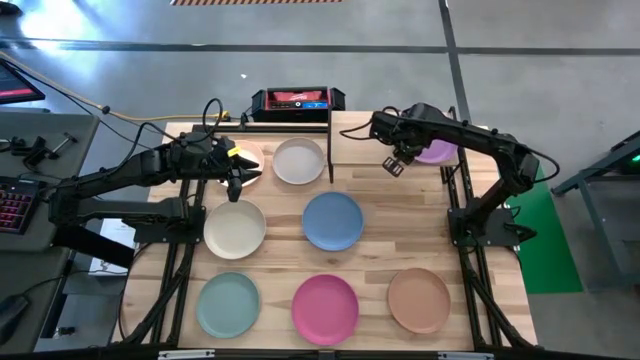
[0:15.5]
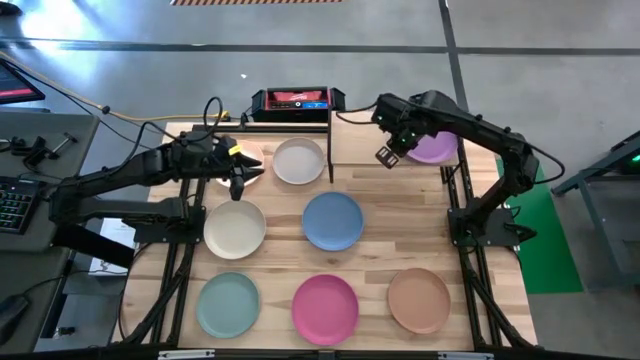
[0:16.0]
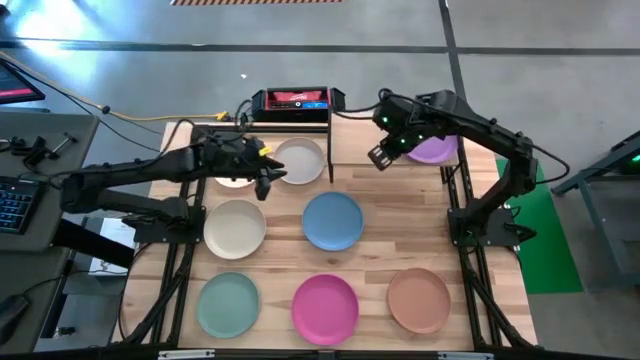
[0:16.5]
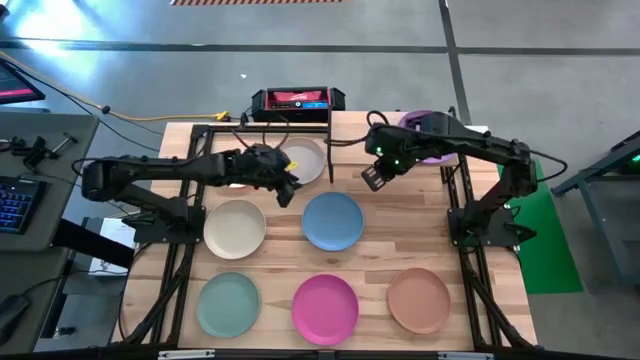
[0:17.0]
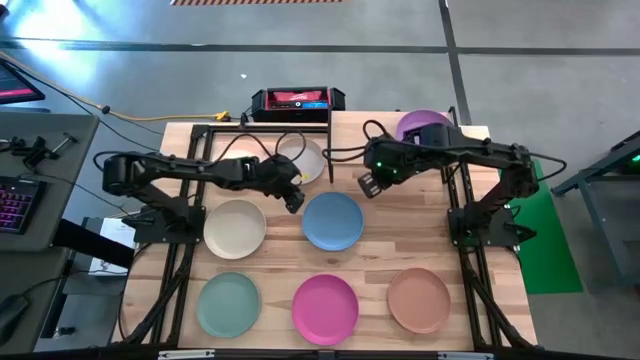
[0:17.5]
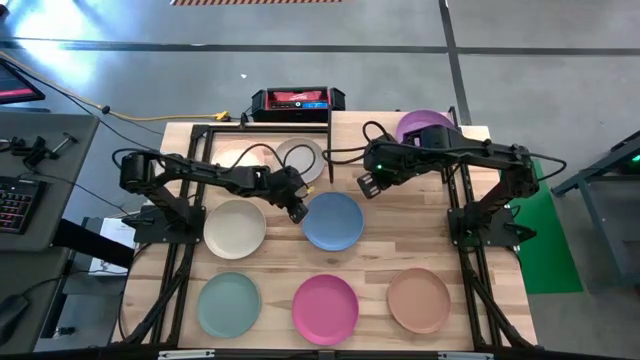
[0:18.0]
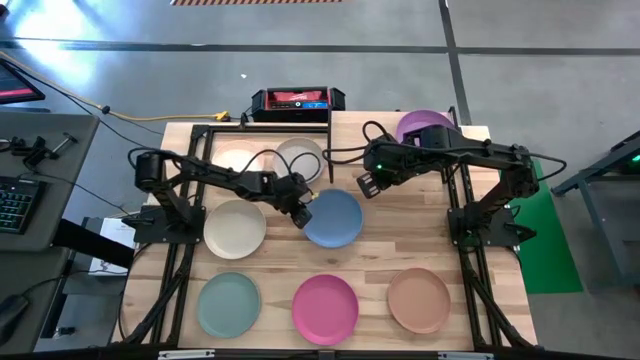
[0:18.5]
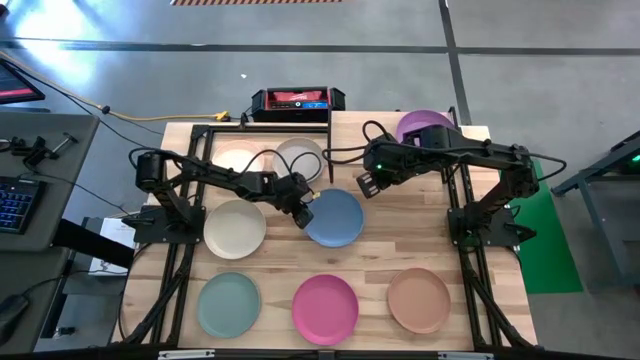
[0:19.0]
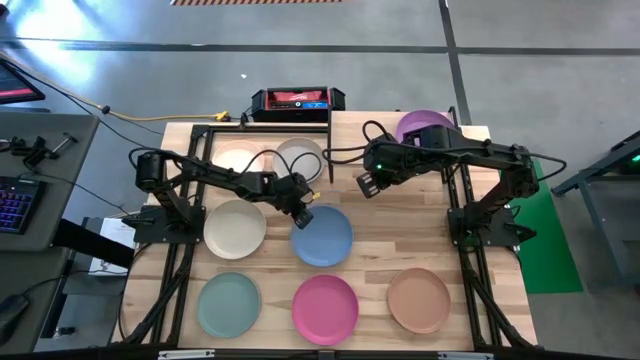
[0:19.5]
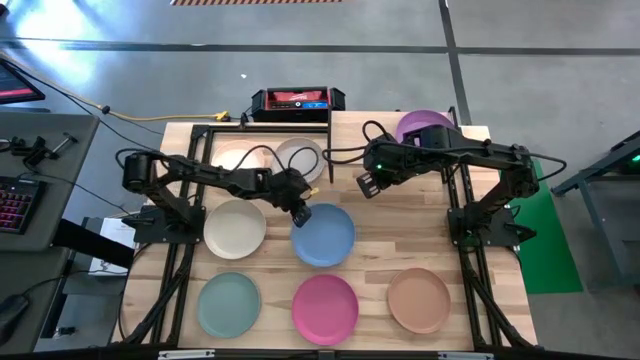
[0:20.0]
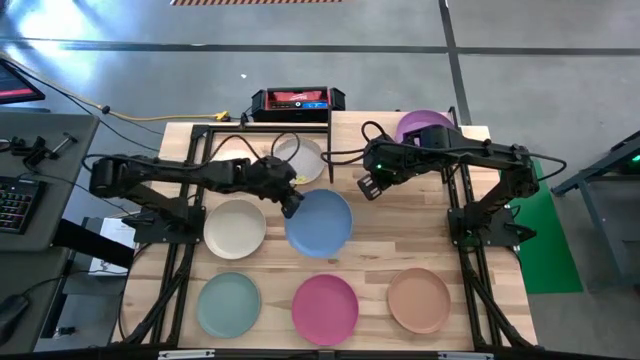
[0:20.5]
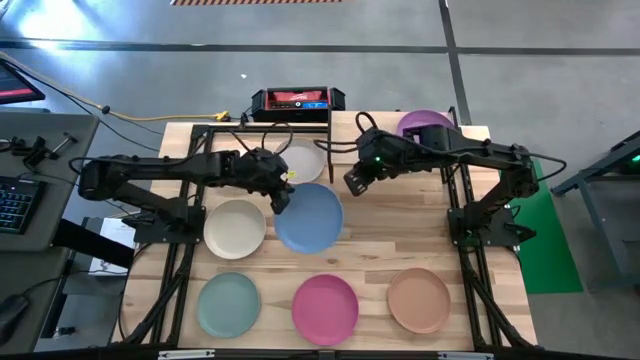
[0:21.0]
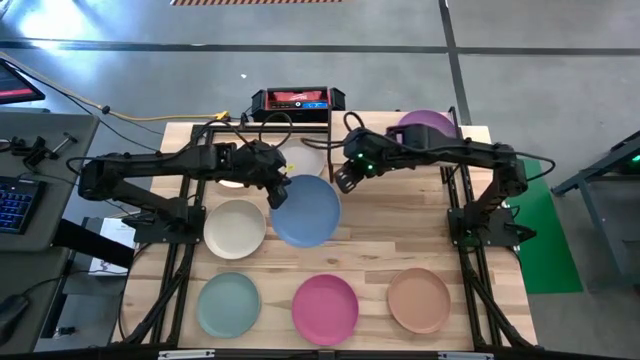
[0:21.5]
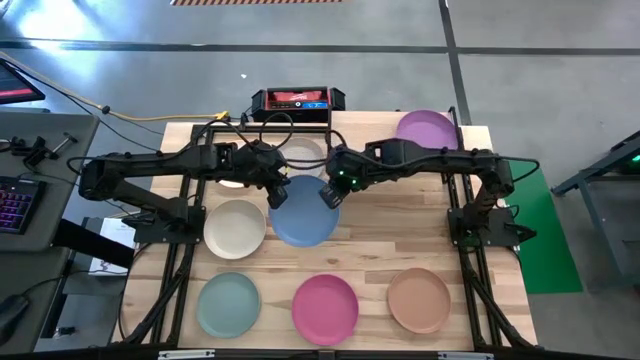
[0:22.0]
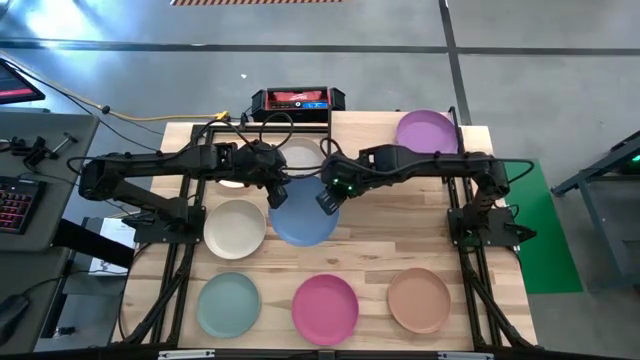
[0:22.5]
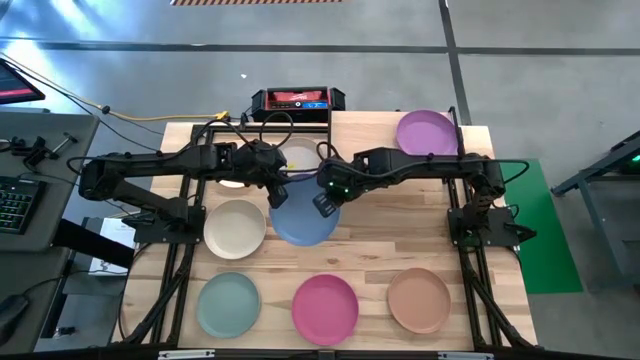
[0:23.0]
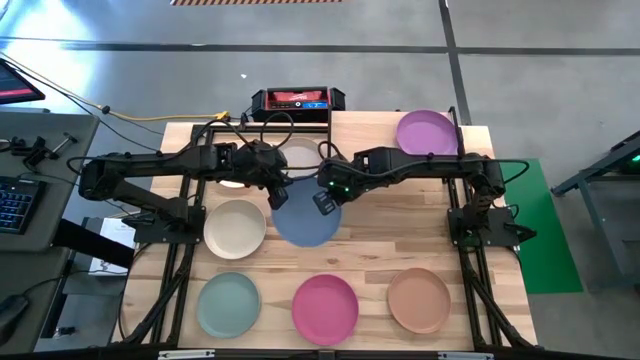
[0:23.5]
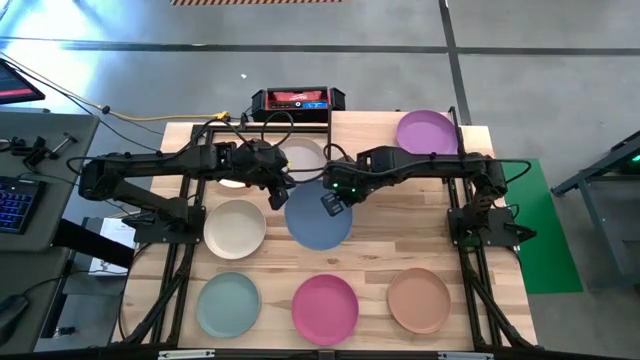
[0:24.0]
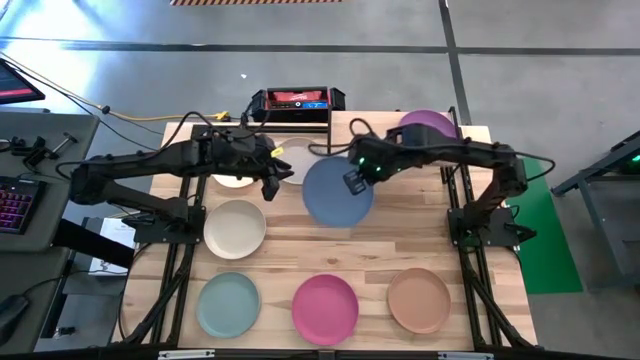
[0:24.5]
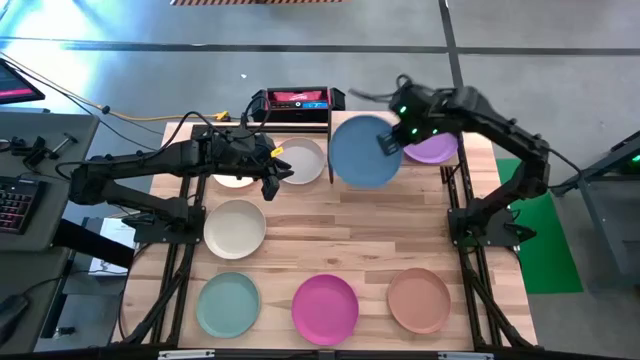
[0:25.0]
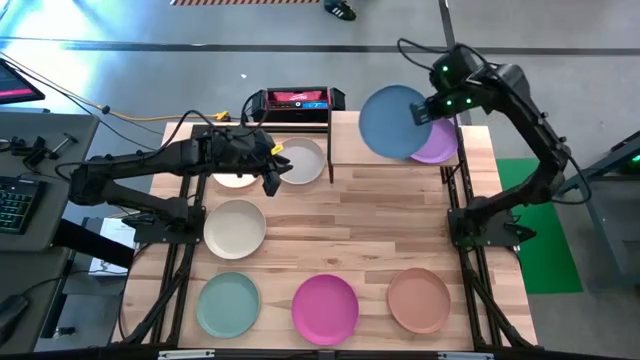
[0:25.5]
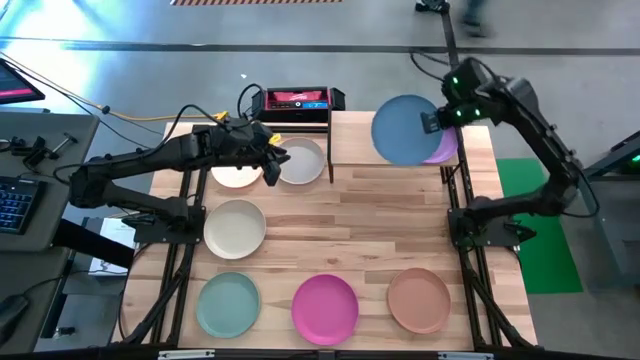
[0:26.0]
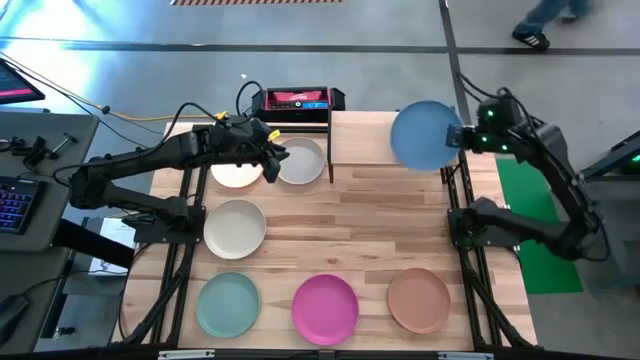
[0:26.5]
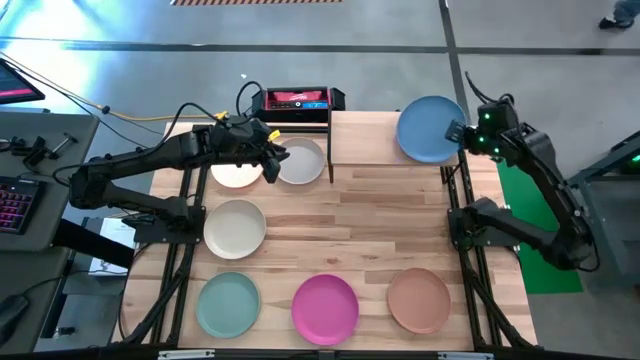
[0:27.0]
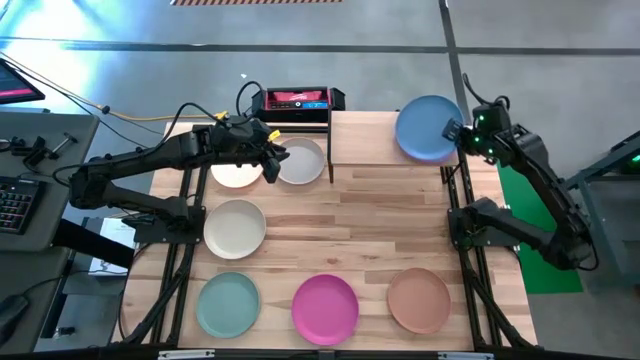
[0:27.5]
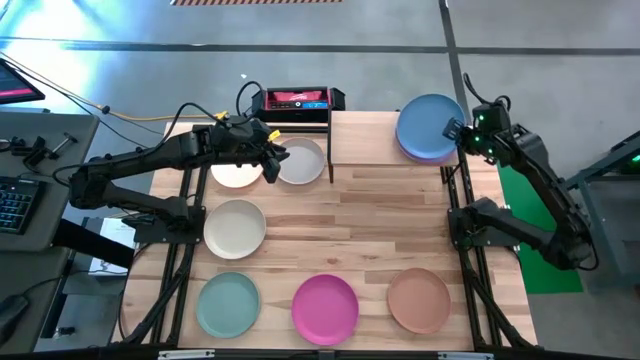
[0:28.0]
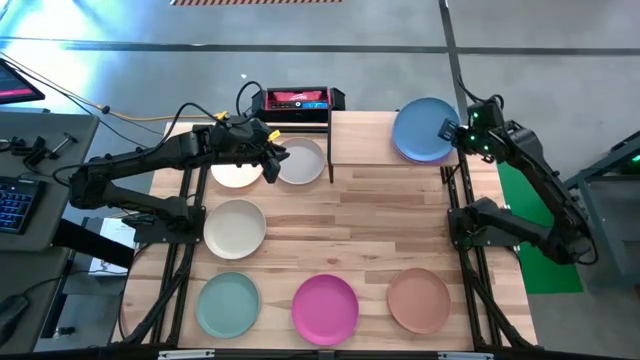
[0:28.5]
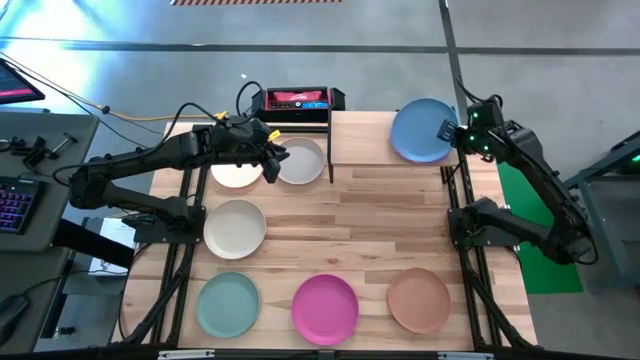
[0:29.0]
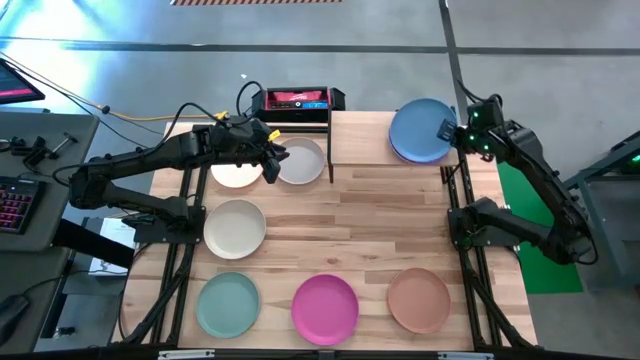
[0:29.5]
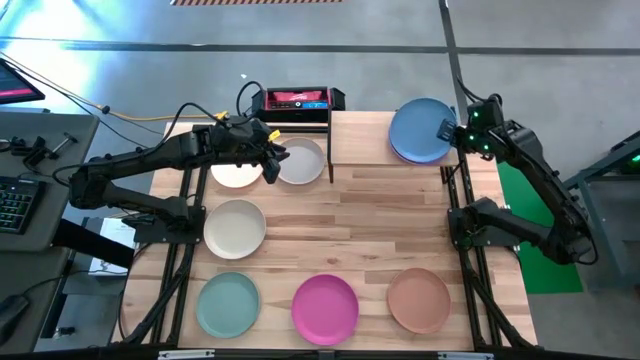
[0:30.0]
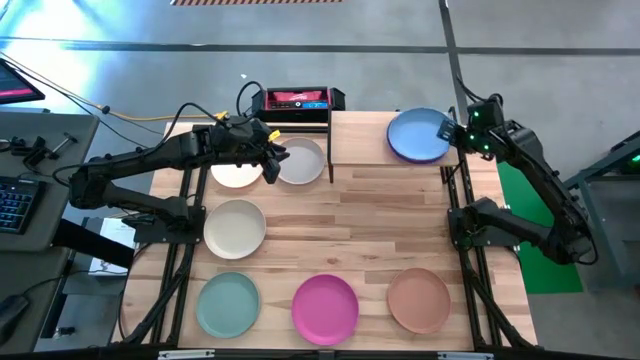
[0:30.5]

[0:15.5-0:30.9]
Task: Place and stack plates onto a shelf
Stack the blue plate on top of the purple plate on the shelf
